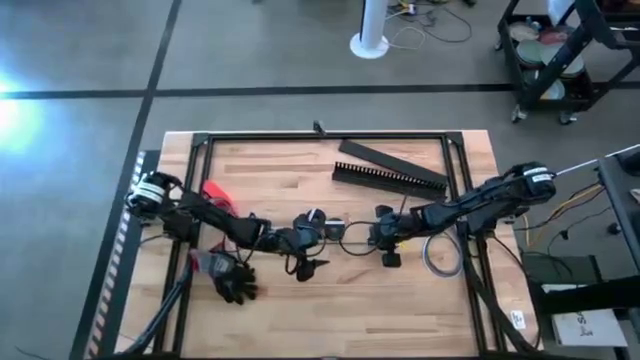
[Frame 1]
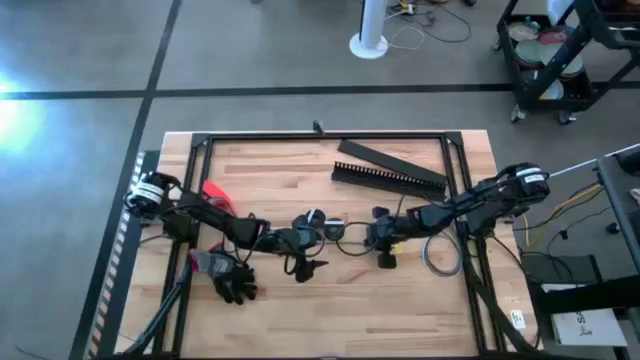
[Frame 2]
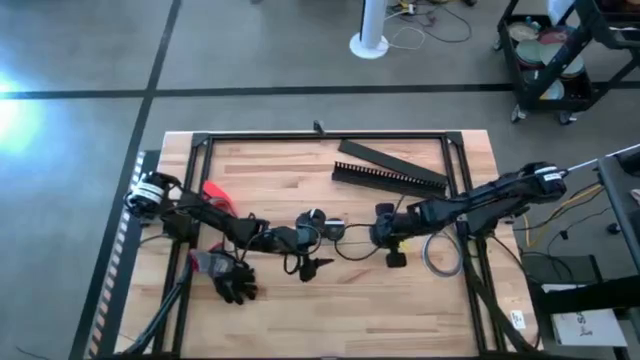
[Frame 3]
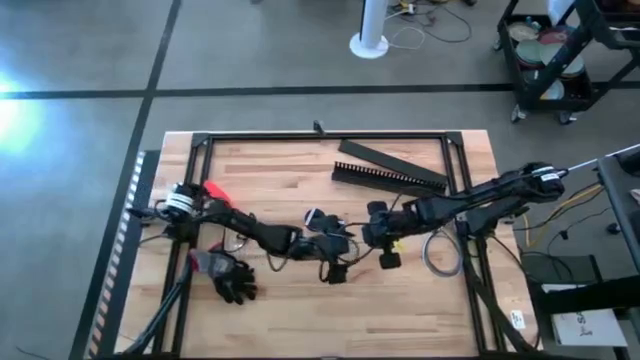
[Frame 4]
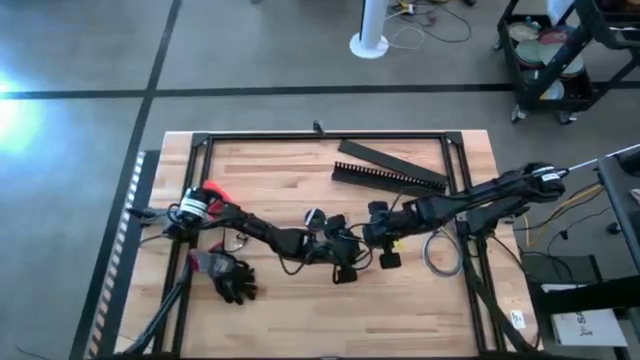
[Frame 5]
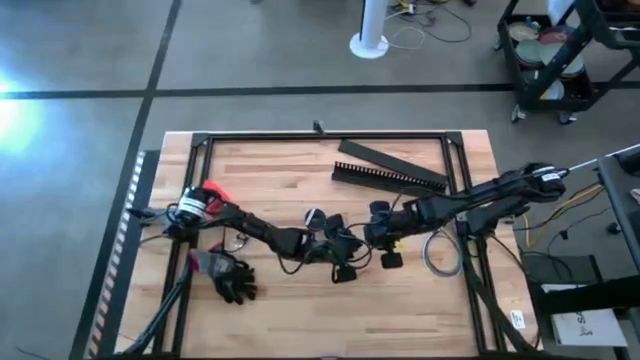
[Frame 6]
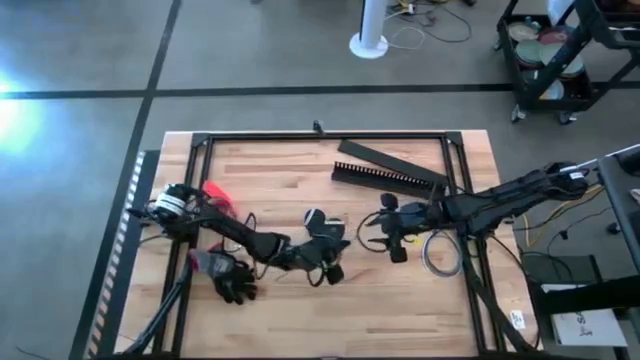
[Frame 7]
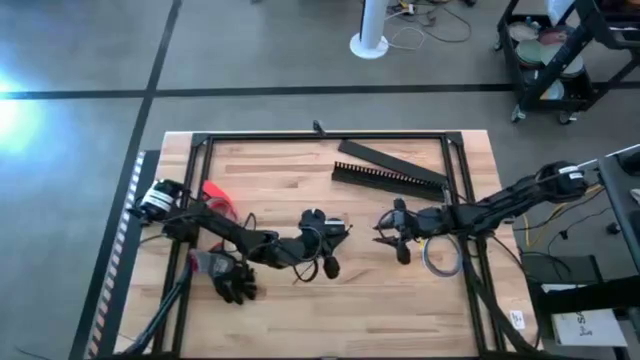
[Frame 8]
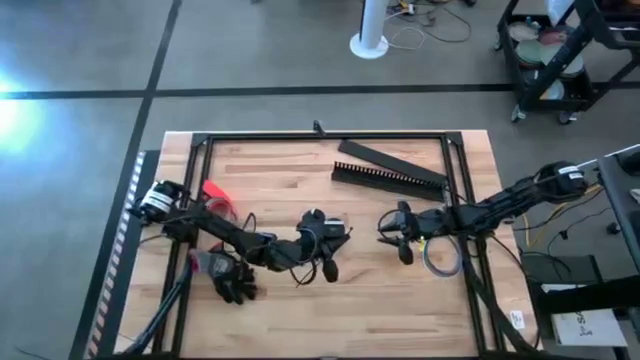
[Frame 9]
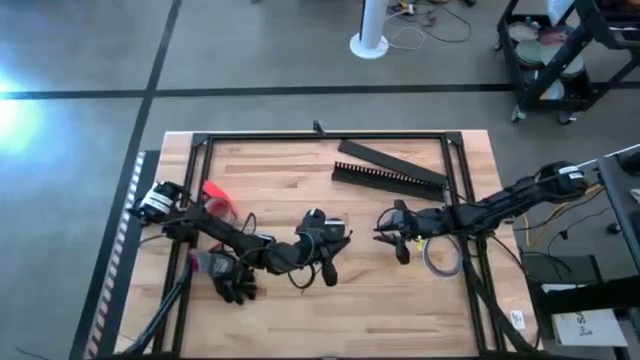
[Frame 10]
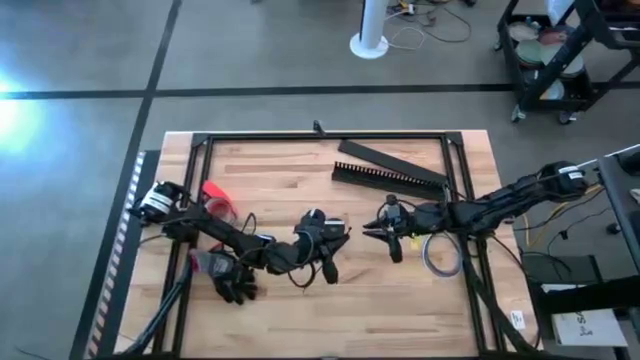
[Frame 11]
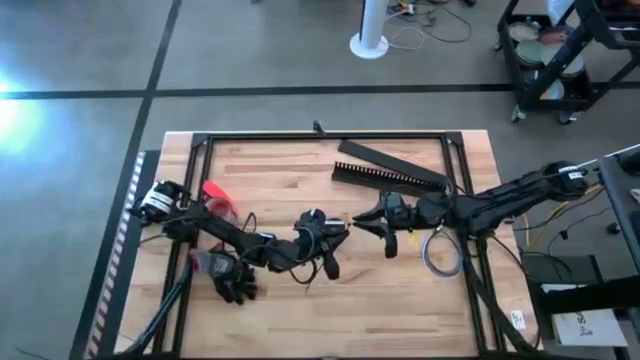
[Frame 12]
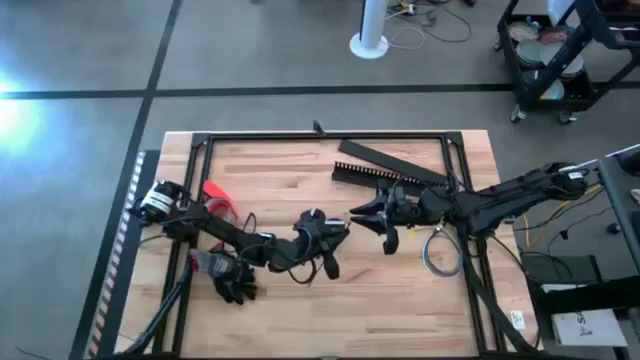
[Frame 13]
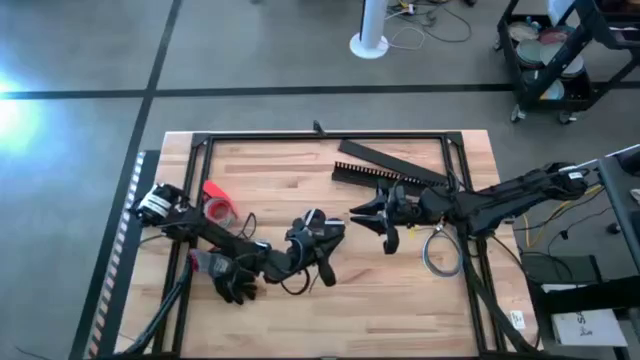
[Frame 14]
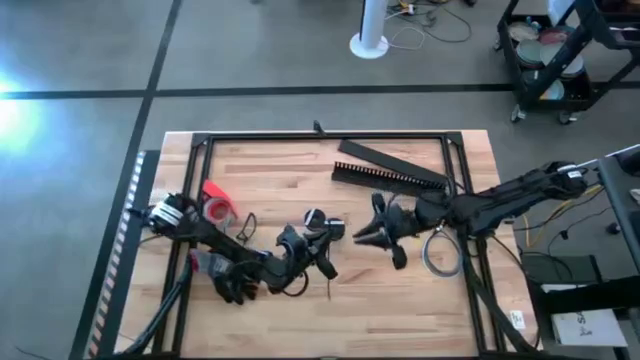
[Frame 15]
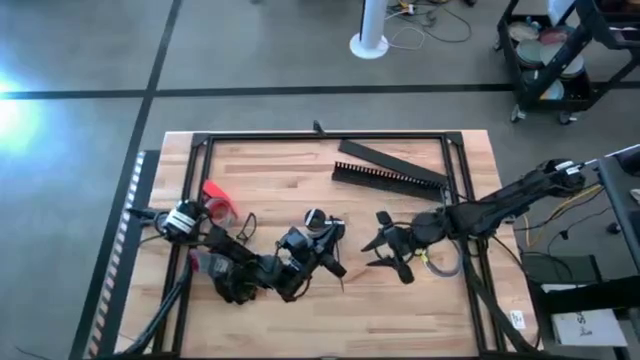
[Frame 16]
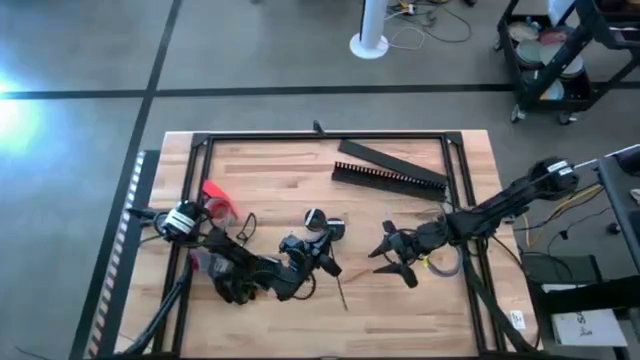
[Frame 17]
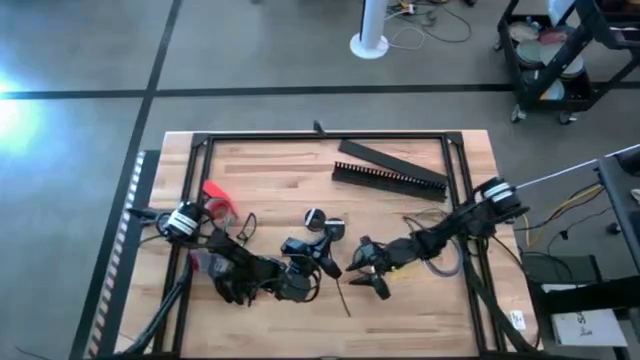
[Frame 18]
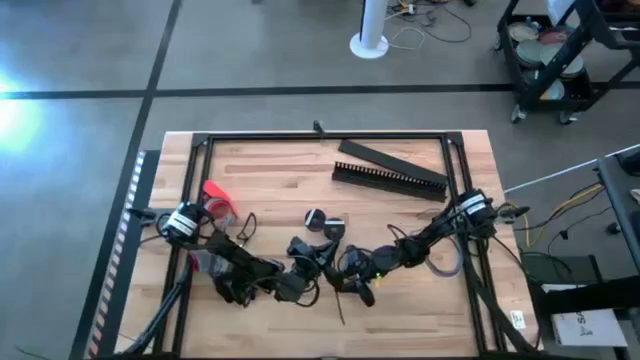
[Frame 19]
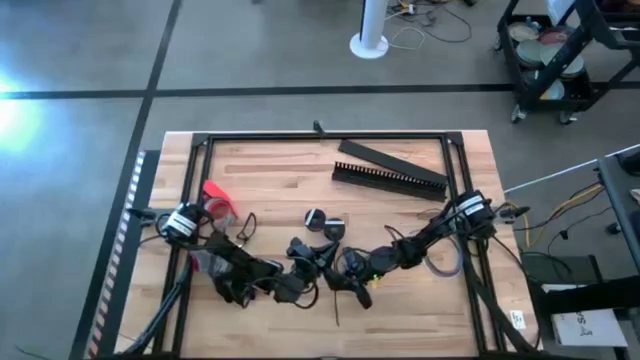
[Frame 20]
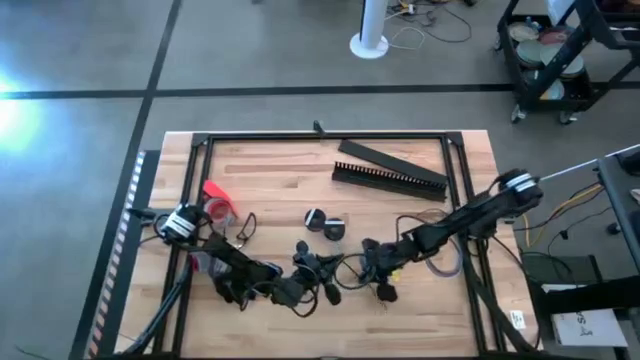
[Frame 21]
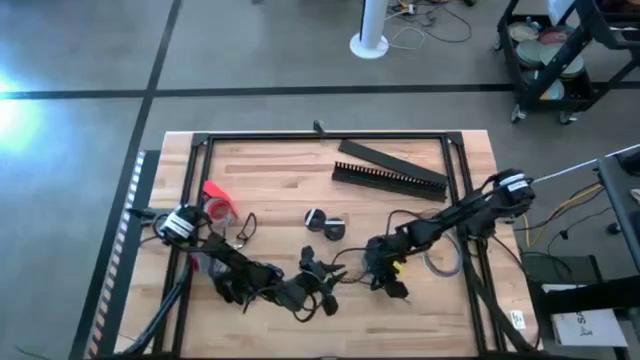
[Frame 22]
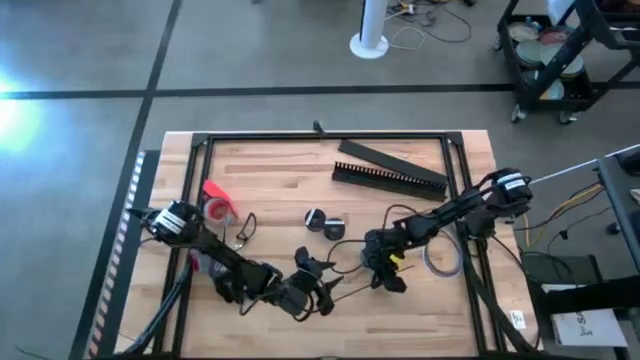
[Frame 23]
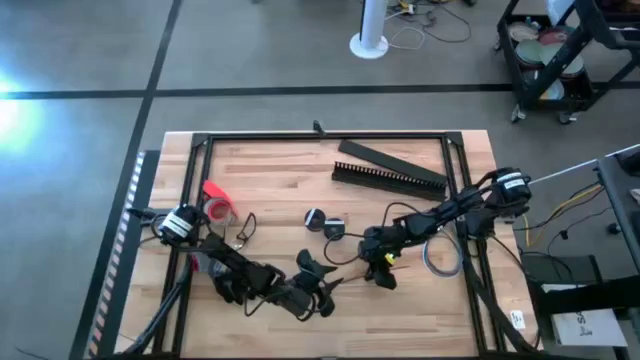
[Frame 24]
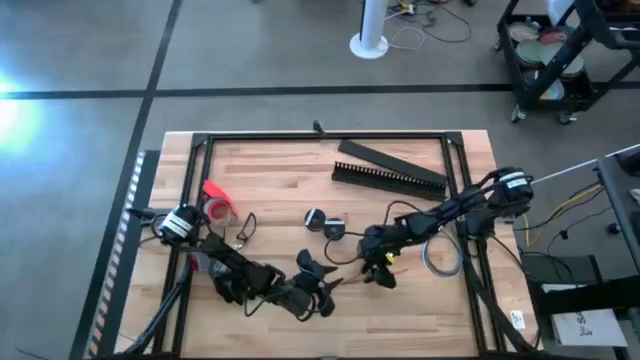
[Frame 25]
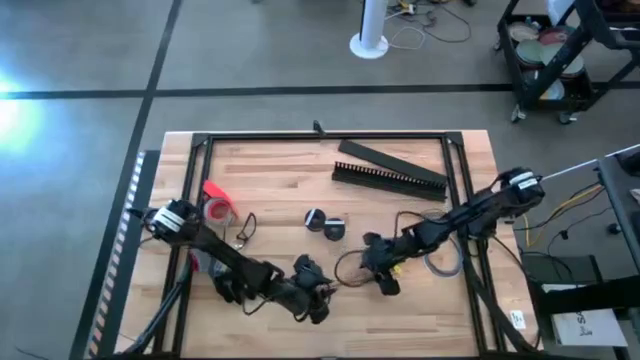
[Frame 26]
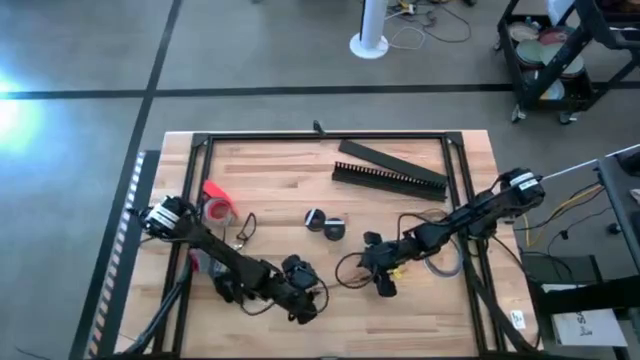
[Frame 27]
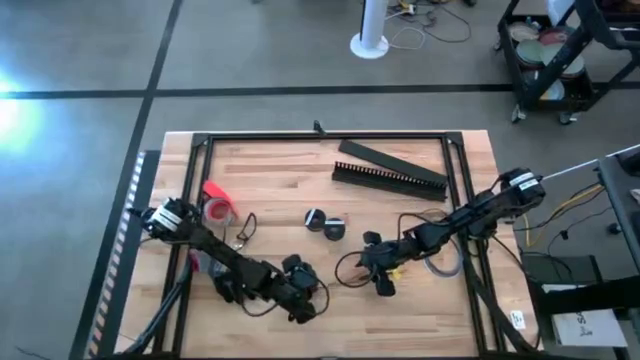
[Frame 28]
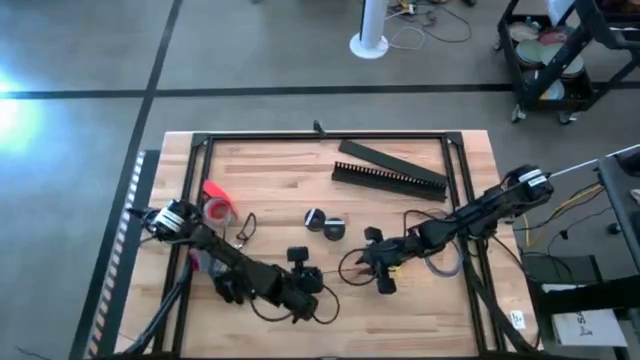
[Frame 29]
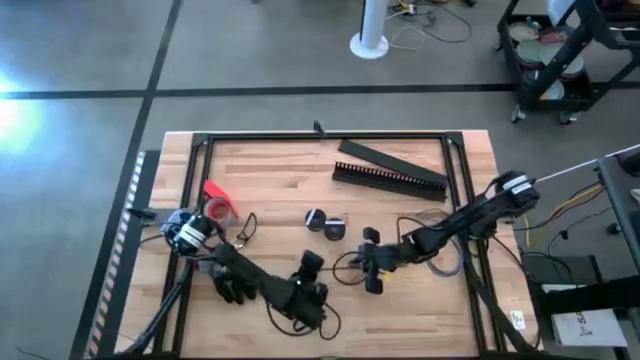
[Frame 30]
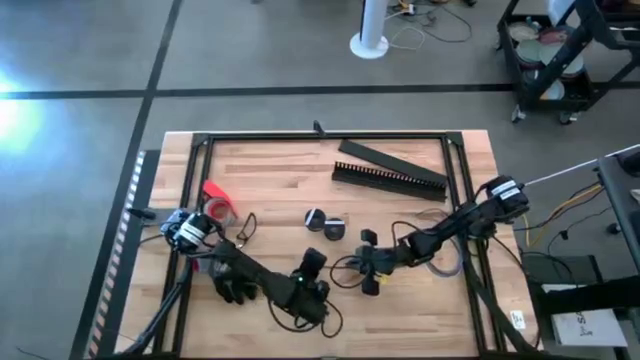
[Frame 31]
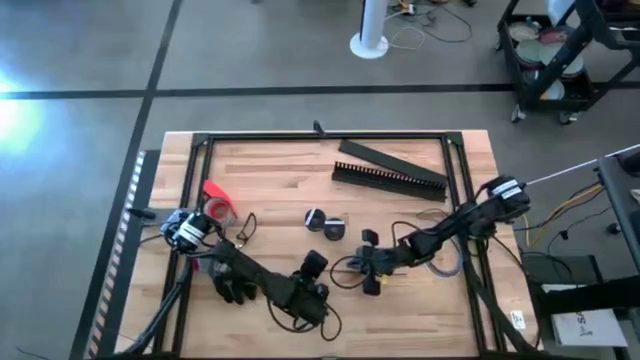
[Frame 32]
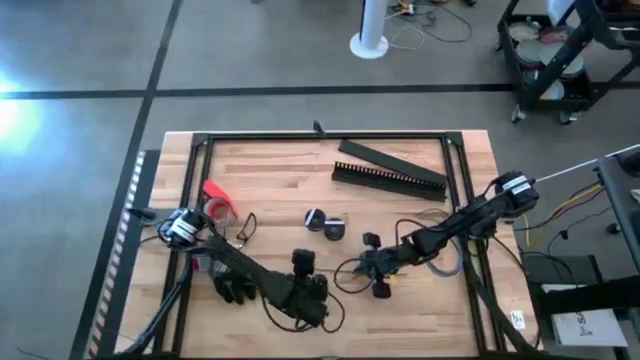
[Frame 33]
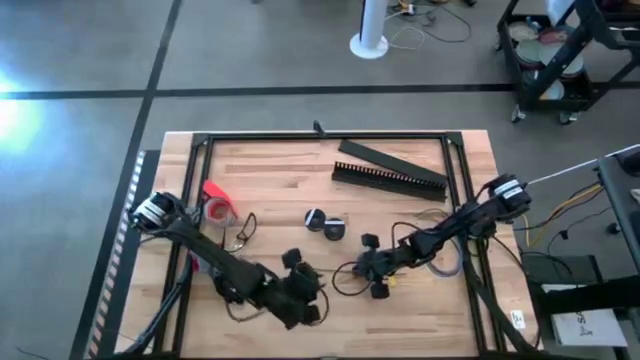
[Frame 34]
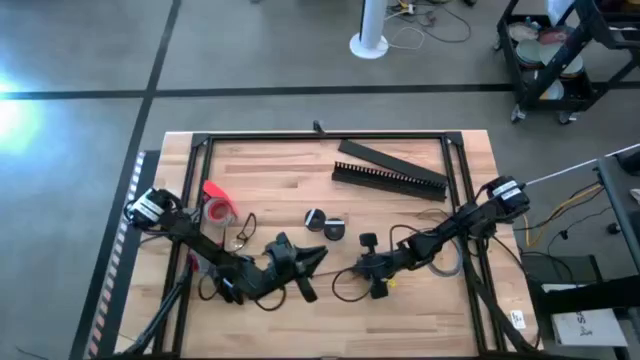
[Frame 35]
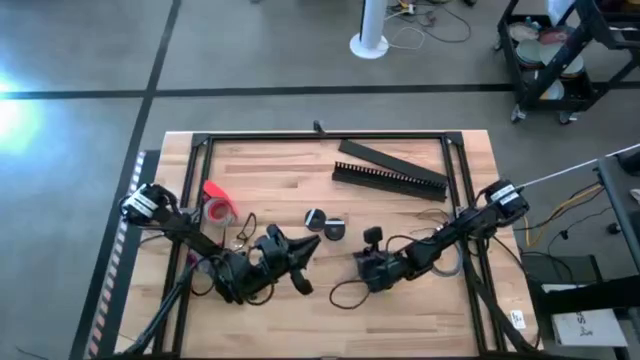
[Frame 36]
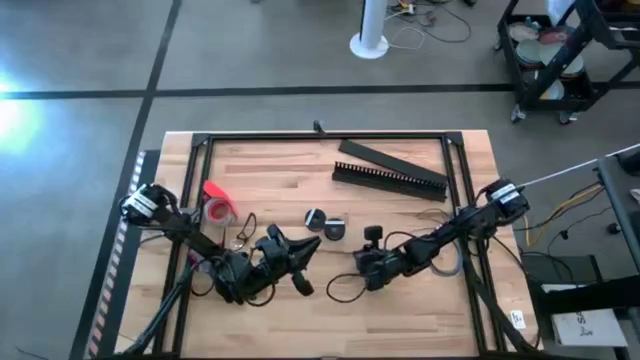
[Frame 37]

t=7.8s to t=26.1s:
Task: Ziptie cables
Prepare the black zip tie
